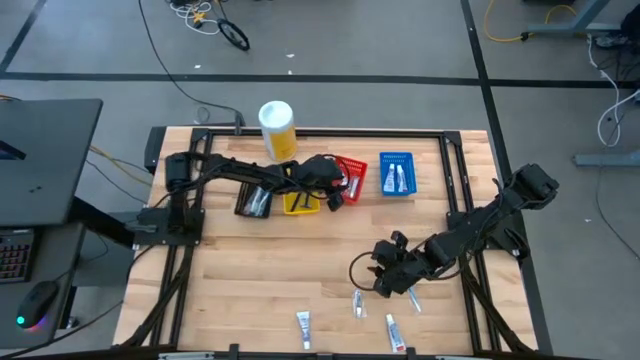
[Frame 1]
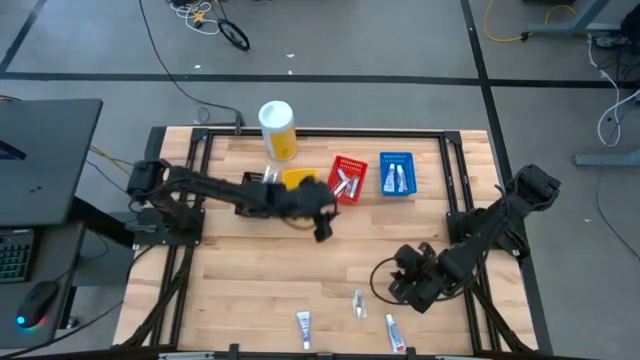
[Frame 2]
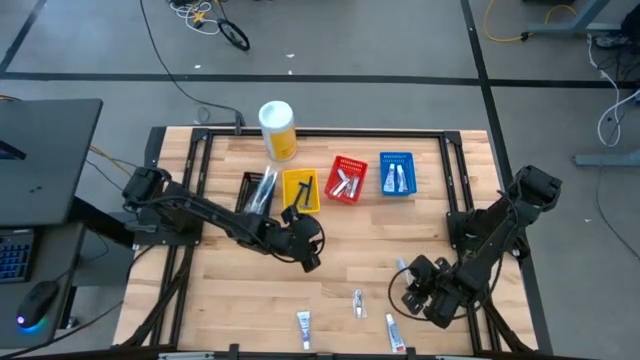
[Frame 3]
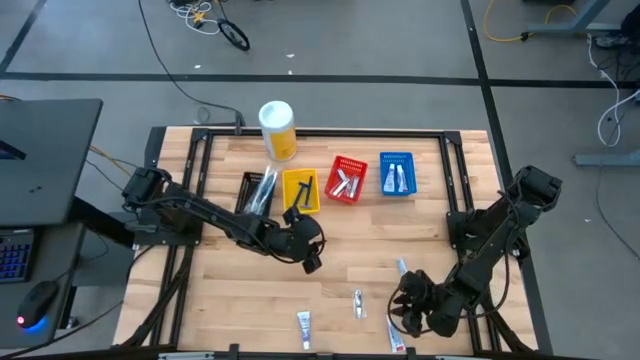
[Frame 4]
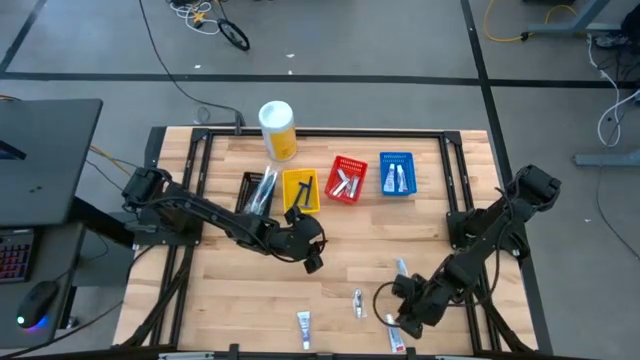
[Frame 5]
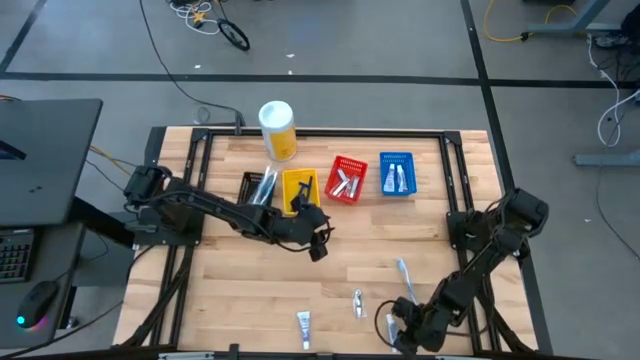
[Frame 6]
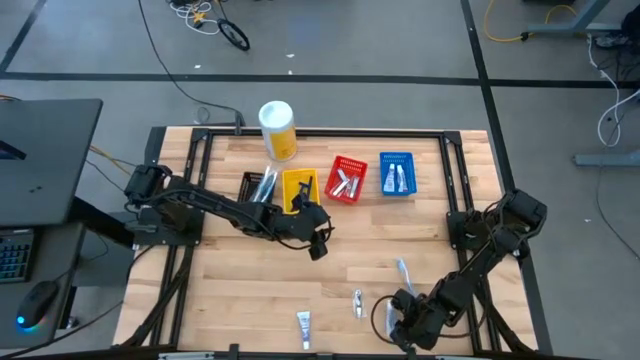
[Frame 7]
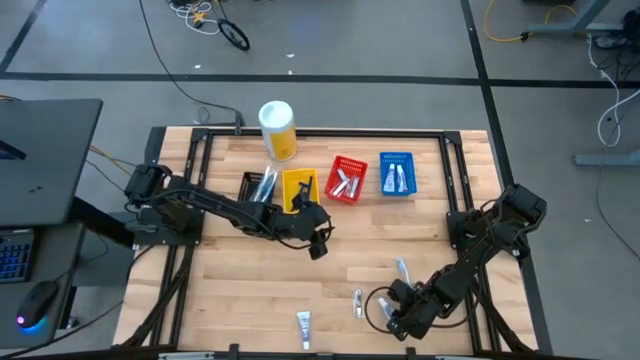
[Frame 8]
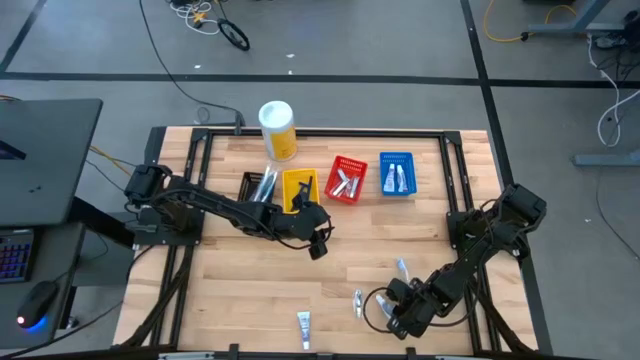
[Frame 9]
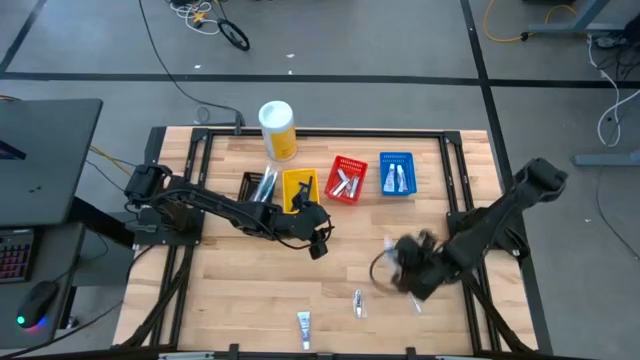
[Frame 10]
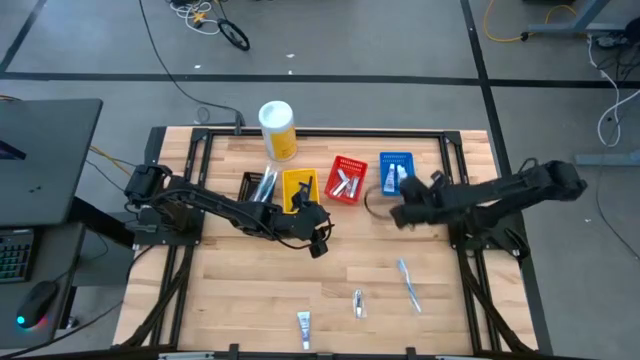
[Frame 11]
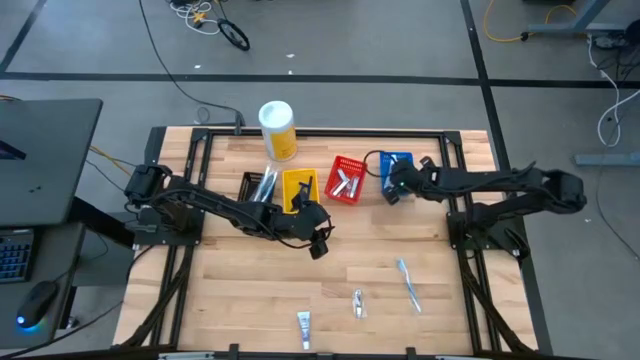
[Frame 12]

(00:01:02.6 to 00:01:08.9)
Task: Pick & Place Travel size toiletries
Put the white toothpaste into the blue bin

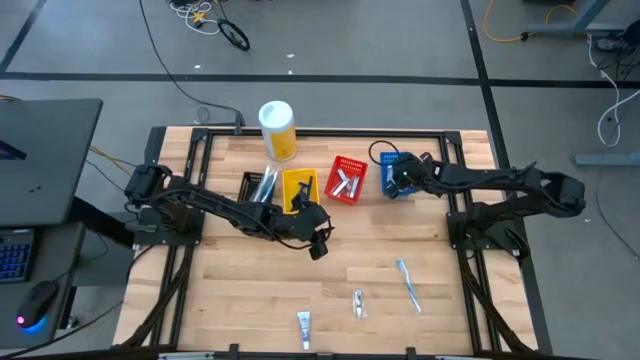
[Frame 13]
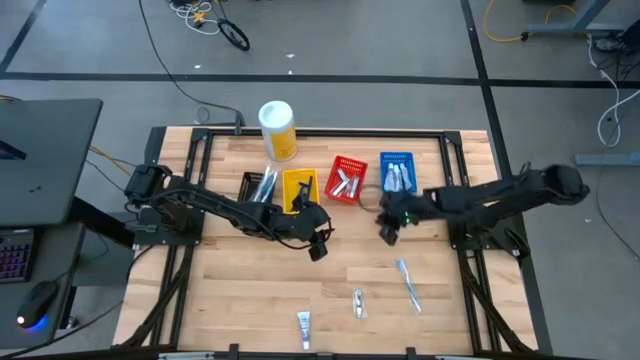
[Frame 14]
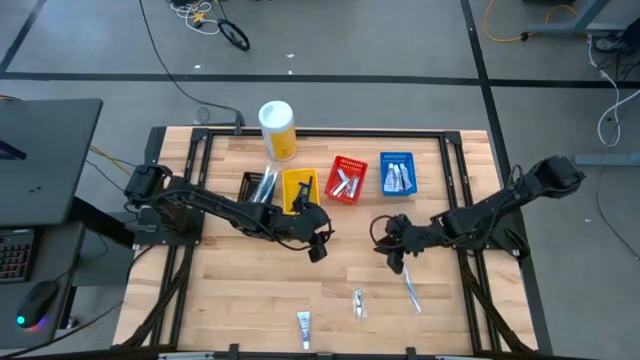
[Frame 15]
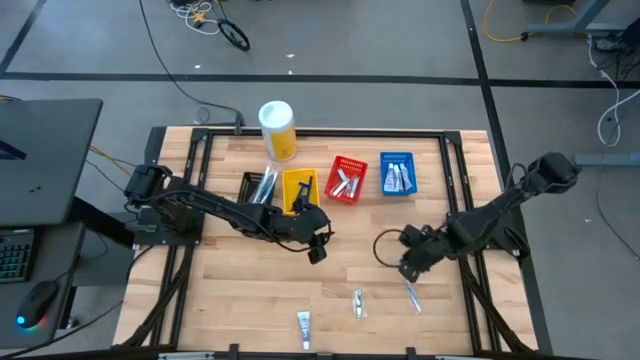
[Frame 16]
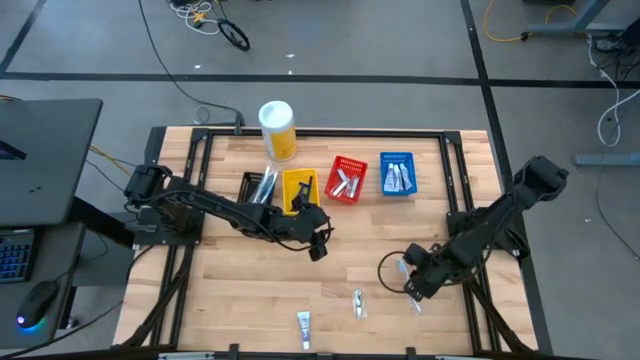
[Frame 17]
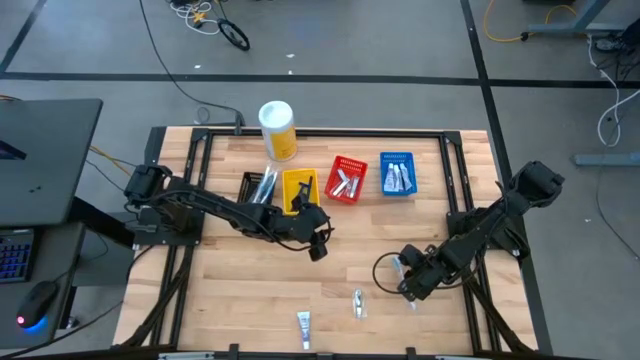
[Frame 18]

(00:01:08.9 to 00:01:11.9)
Put the blue toothbrush into the black bin

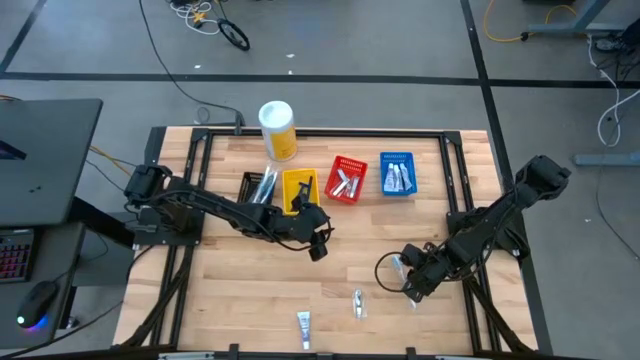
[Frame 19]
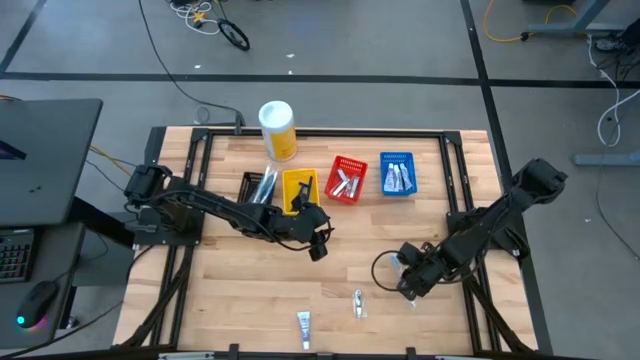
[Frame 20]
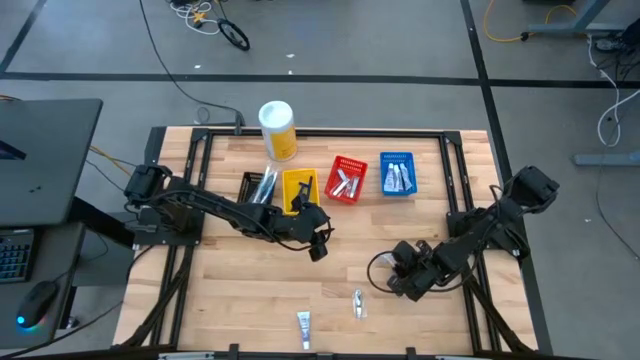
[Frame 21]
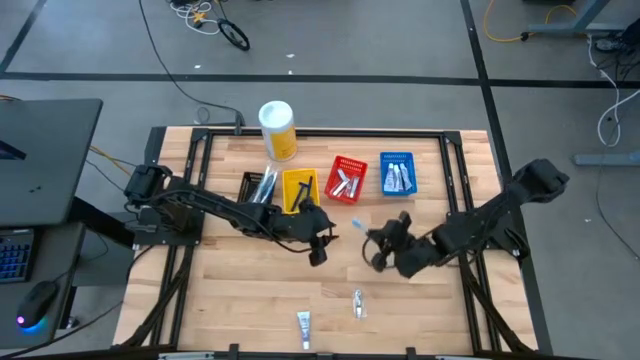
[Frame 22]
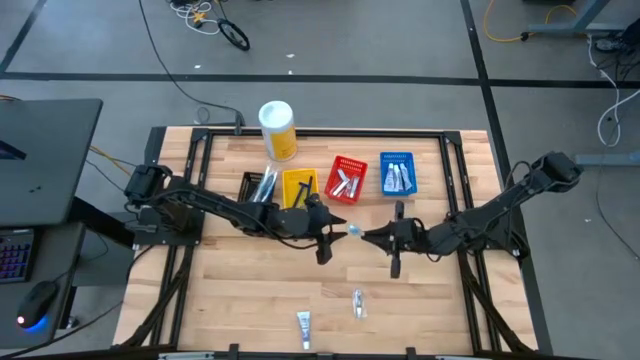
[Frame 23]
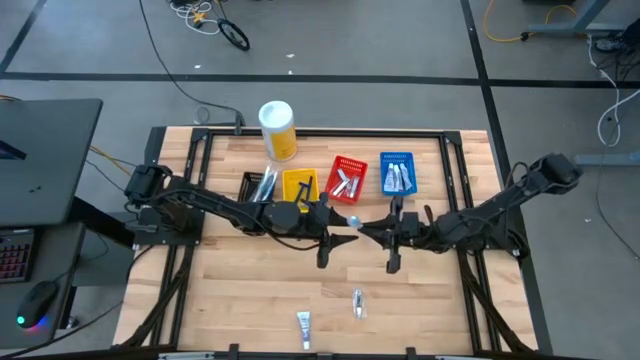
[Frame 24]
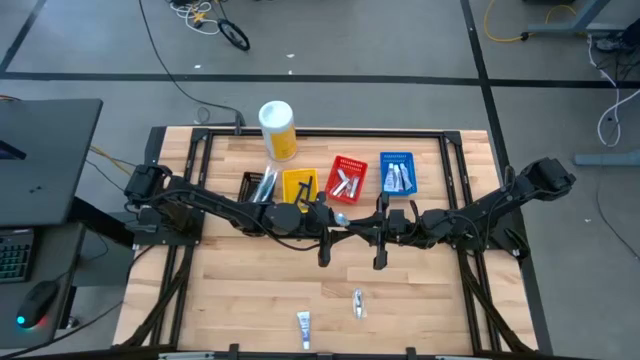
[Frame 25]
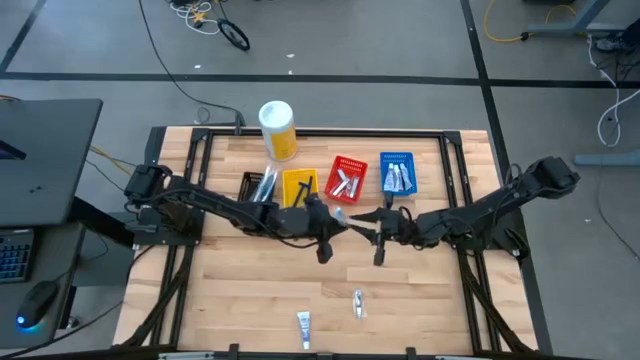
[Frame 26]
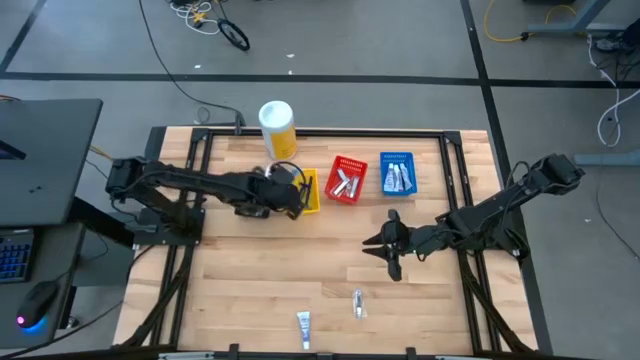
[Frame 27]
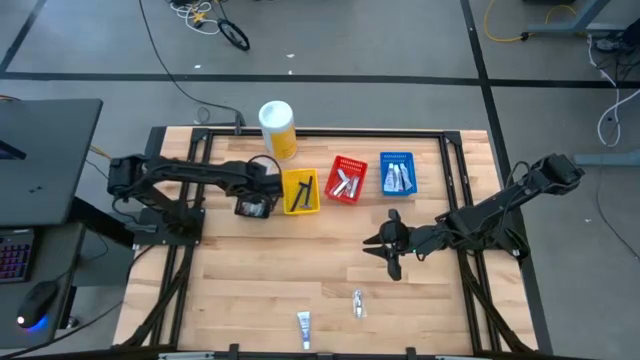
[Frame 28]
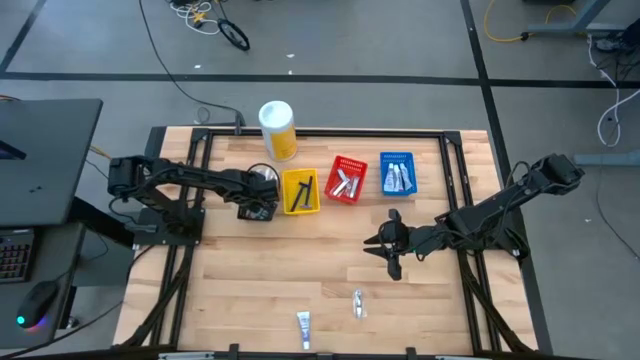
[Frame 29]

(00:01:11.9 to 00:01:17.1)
Put the blue toothbrush into the black bin

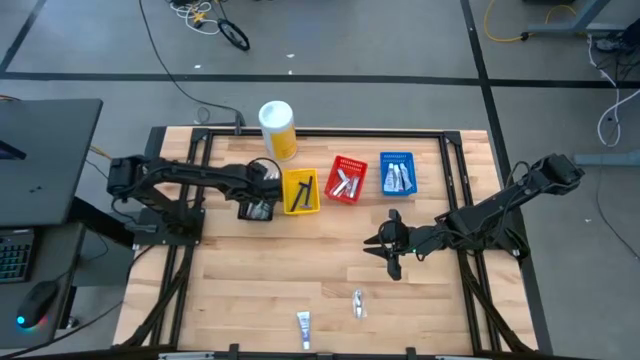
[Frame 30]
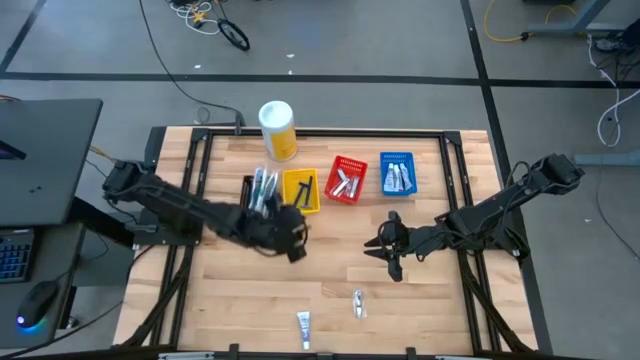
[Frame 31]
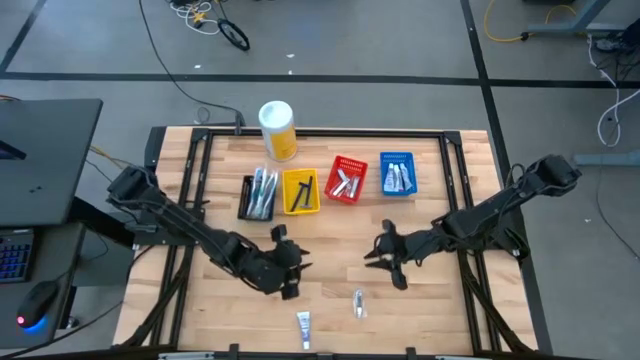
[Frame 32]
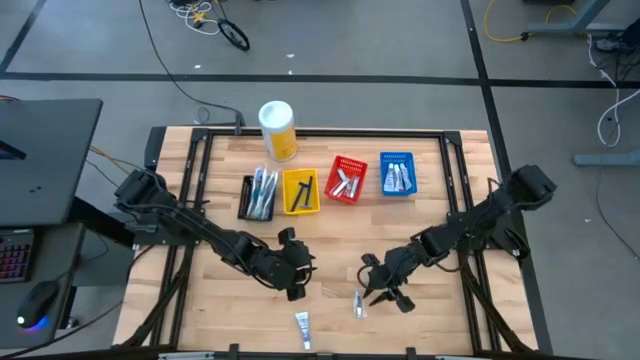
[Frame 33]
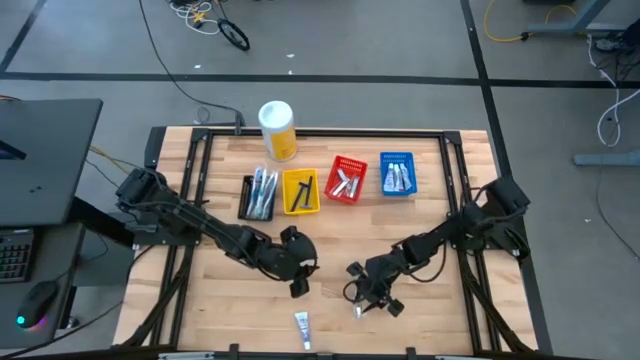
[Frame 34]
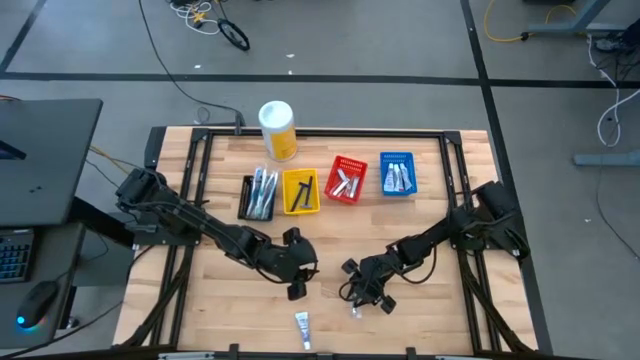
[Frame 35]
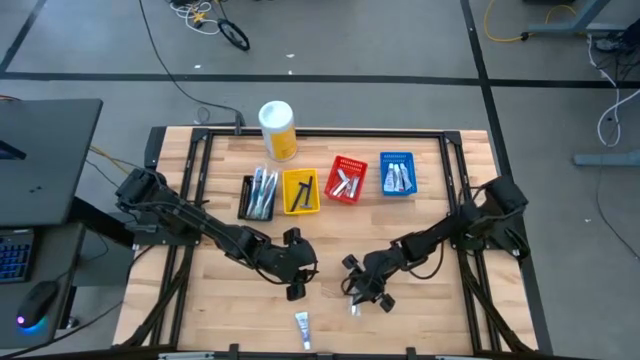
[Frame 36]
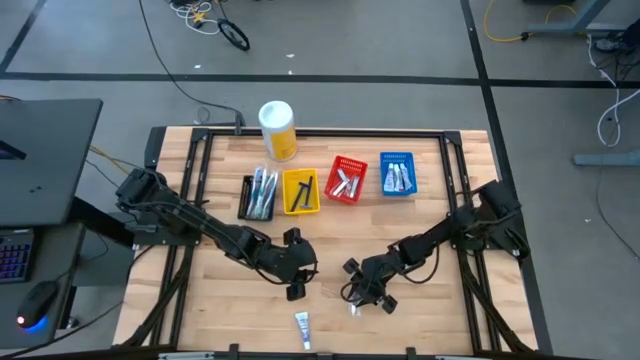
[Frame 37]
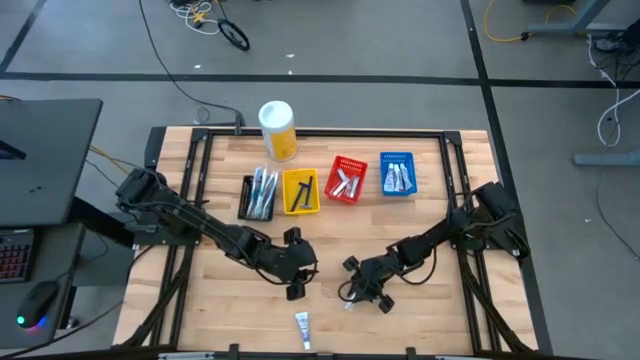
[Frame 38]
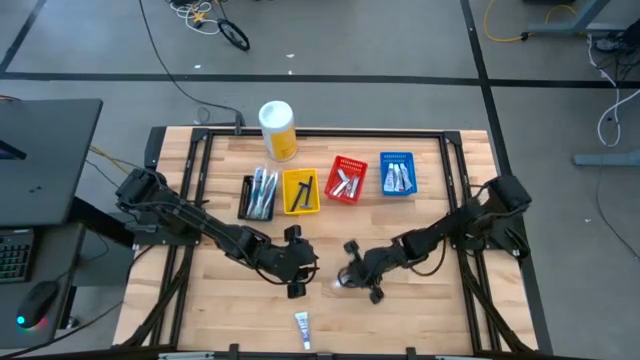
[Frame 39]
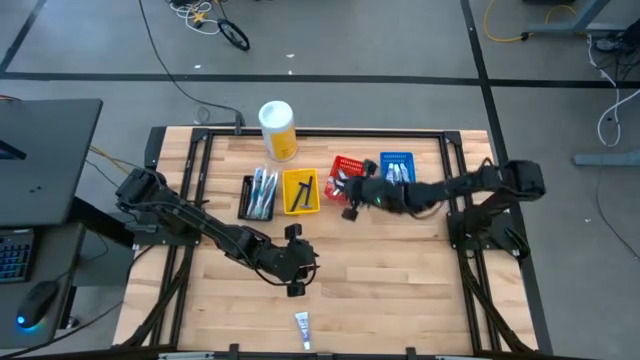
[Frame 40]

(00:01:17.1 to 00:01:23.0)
Put the silver nail cutter into the red bin

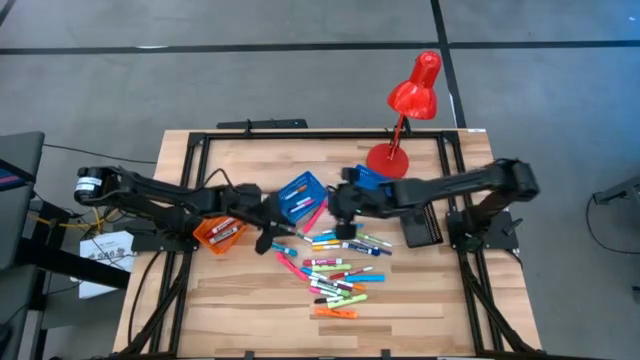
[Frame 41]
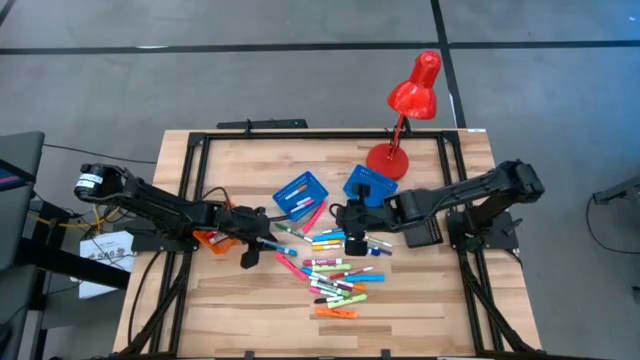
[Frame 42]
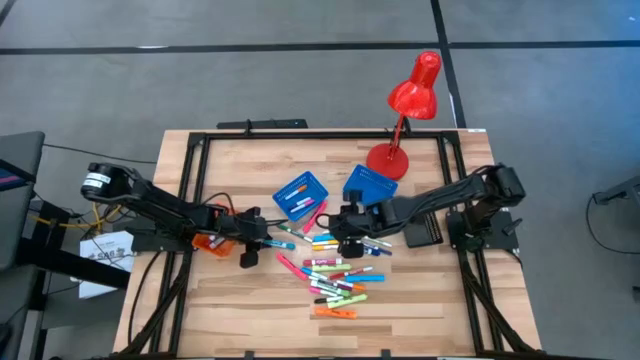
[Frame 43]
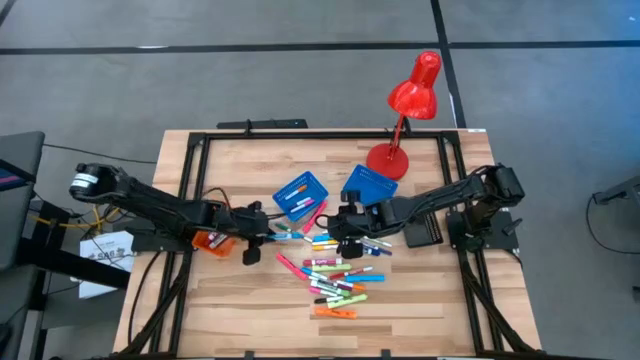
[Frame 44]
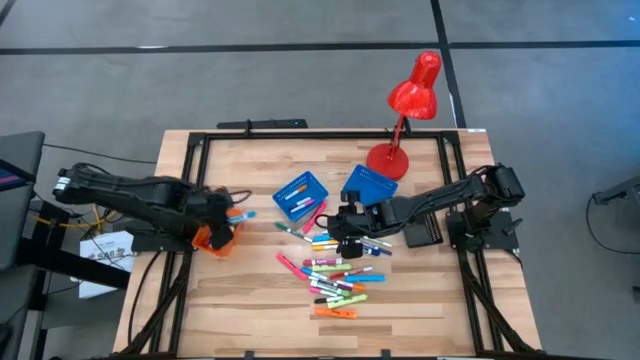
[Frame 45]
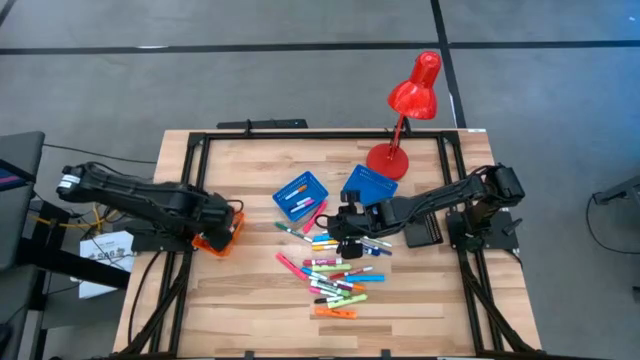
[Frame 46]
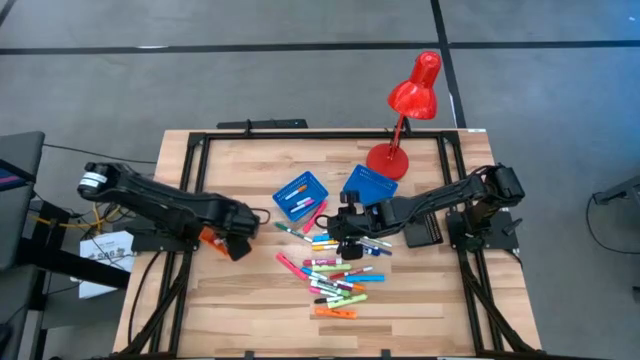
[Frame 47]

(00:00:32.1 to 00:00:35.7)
Task: Pick & Place Markers
Put the large light blue marker pen into the orange bin
